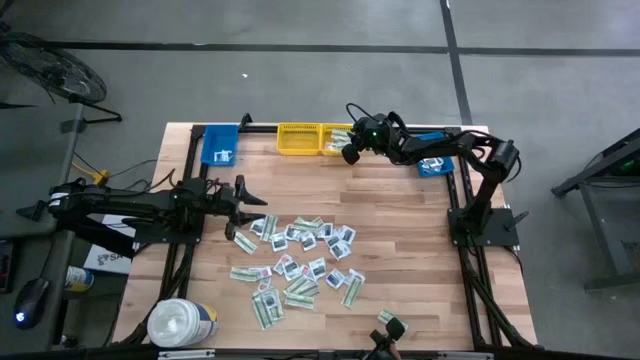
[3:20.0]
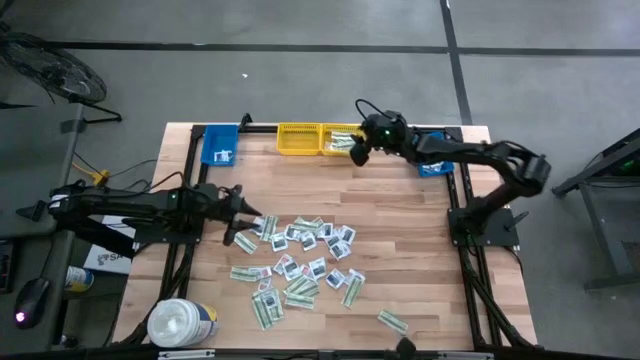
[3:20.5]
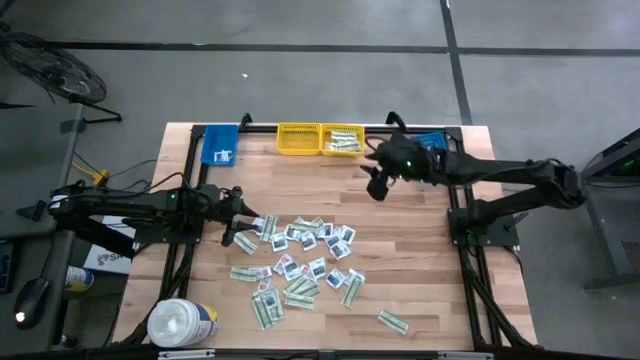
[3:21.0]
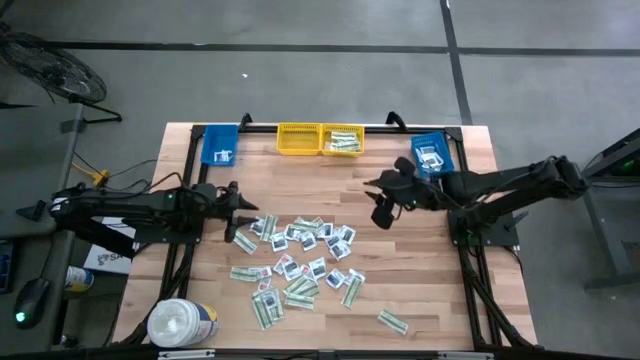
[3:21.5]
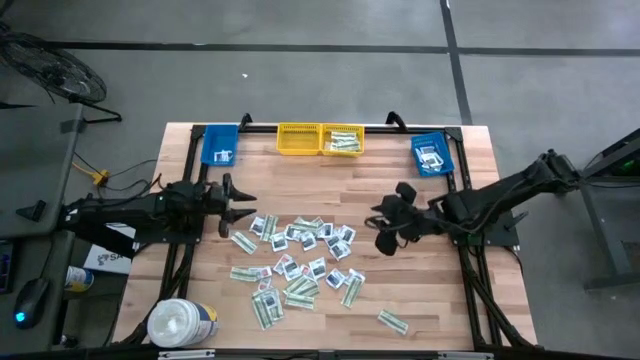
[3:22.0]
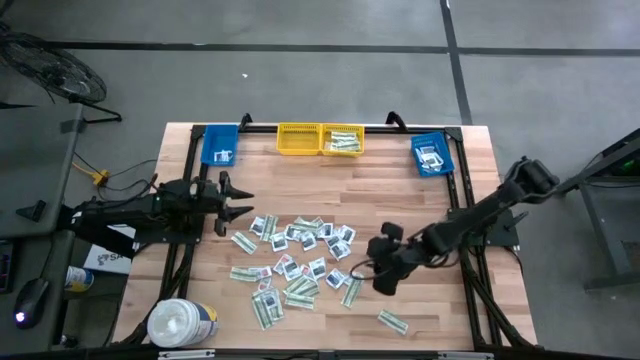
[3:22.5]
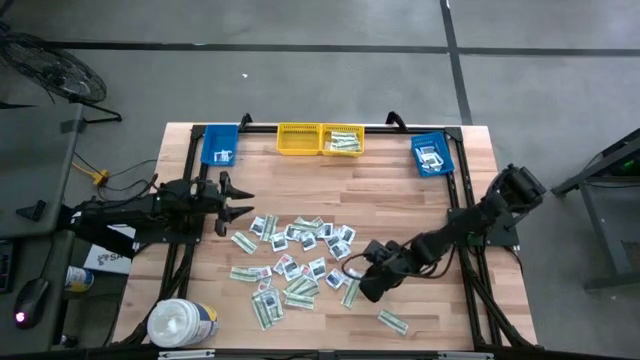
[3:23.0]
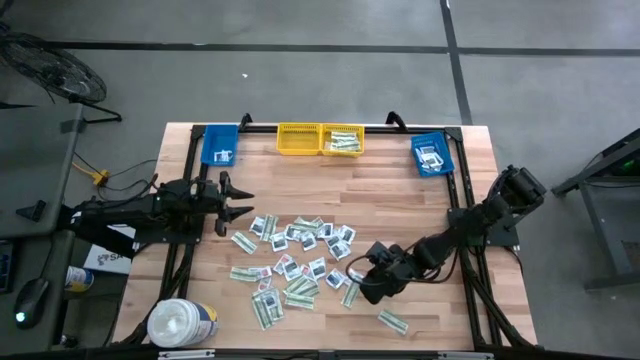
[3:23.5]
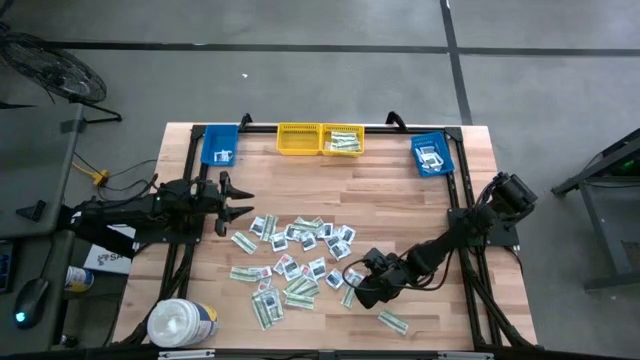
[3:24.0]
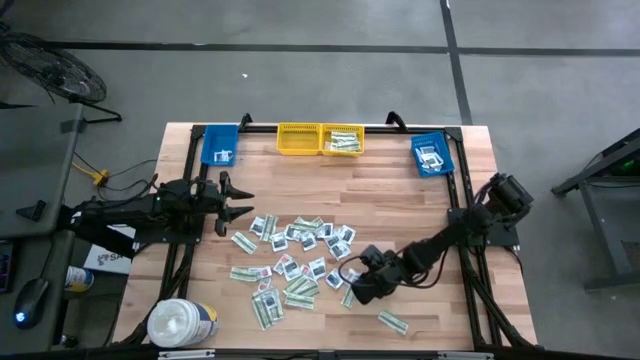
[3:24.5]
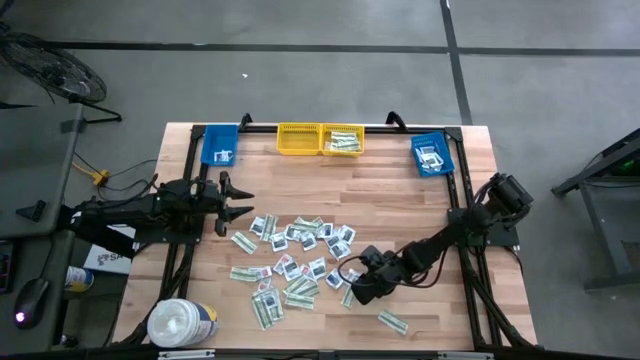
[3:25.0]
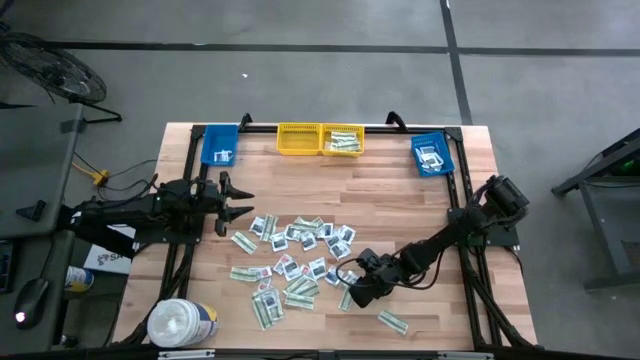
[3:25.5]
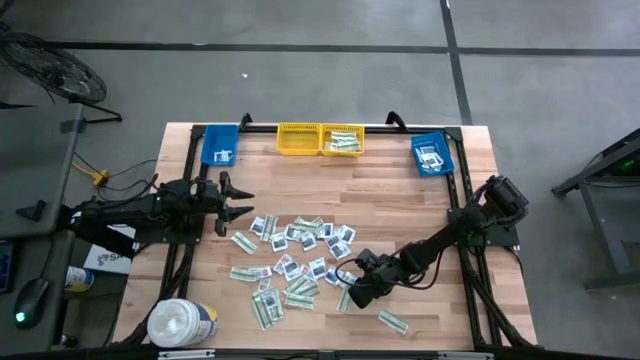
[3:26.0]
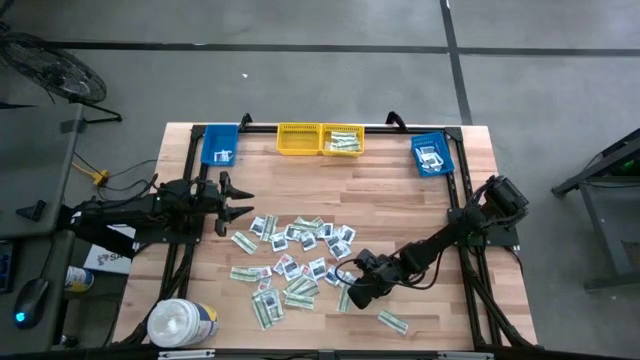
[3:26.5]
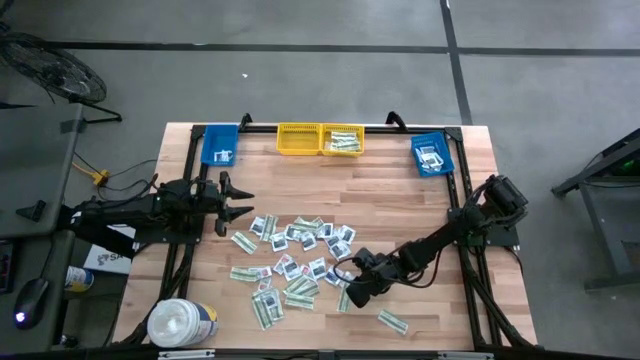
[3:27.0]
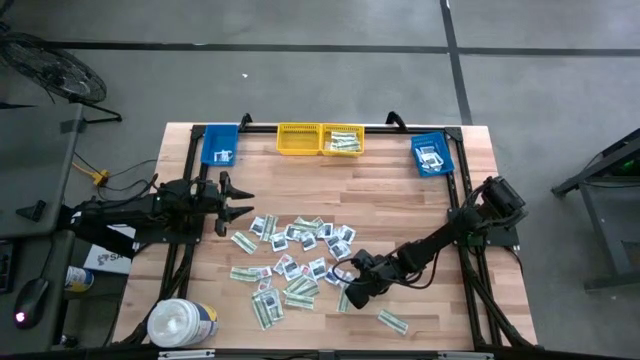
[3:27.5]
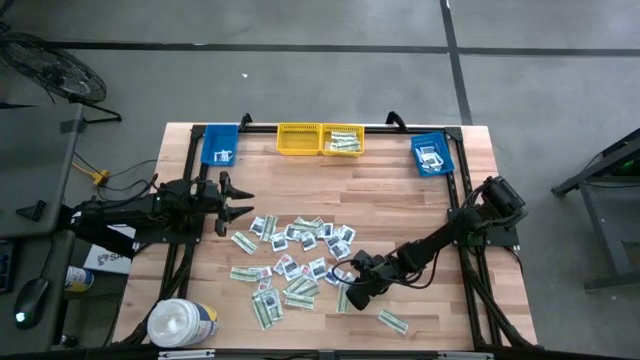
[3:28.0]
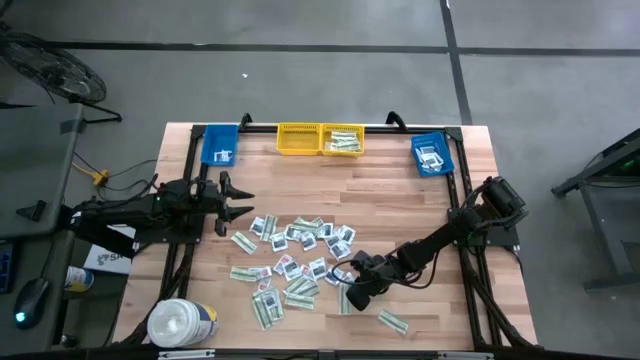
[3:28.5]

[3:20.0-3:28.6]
Task: Pick & Place First Aid Supplies
Put the green bandage pack into the right yellow bin

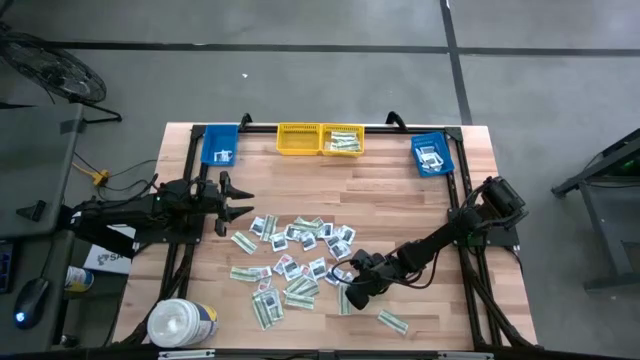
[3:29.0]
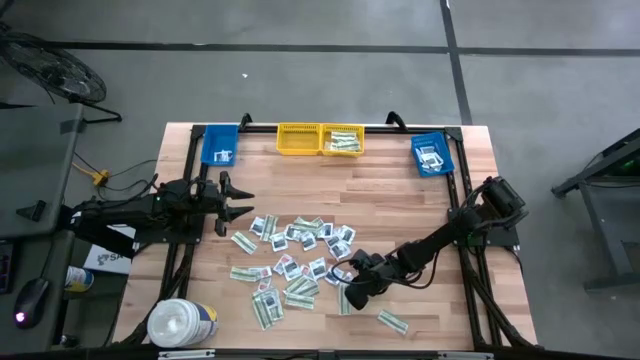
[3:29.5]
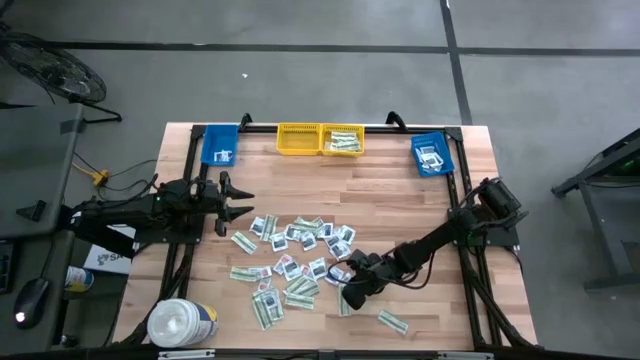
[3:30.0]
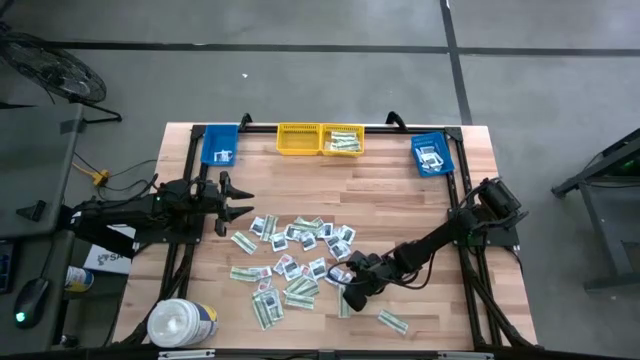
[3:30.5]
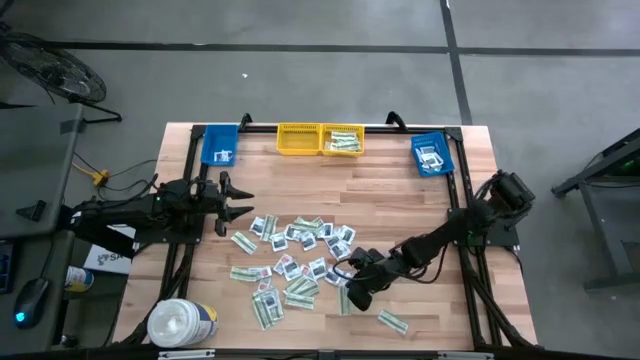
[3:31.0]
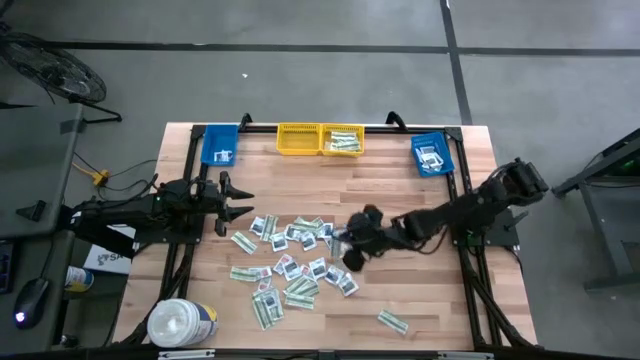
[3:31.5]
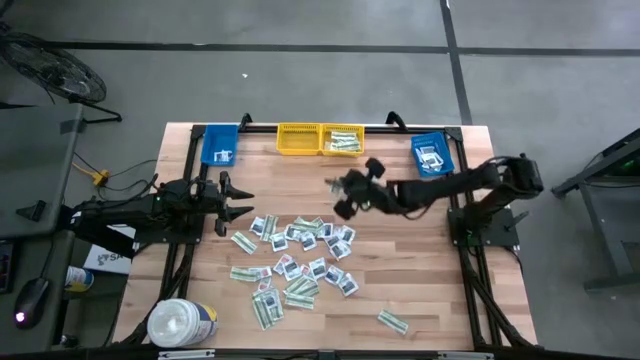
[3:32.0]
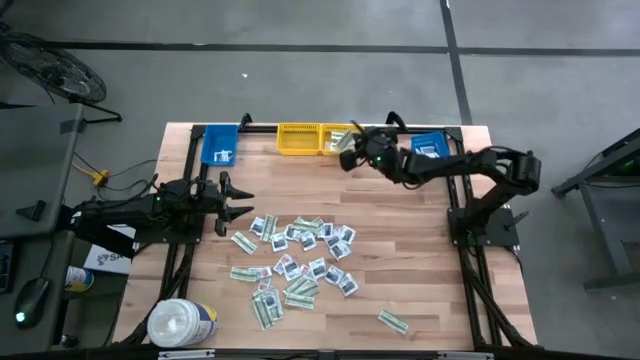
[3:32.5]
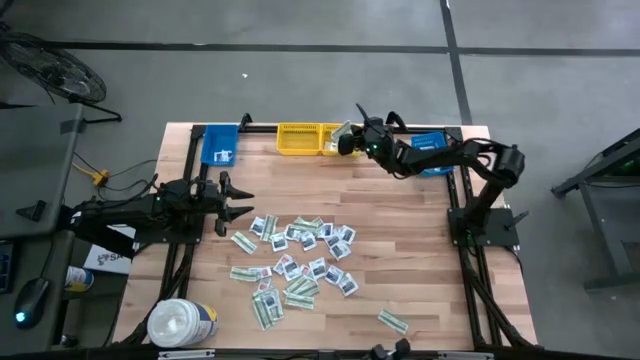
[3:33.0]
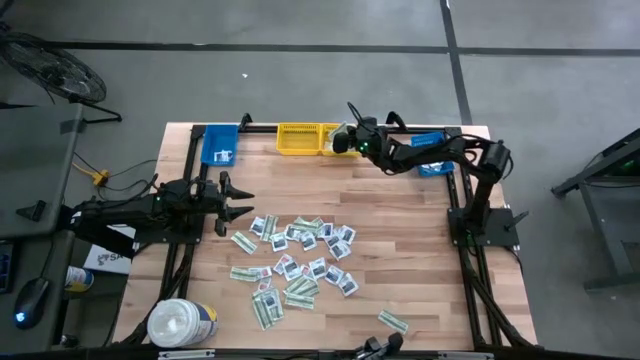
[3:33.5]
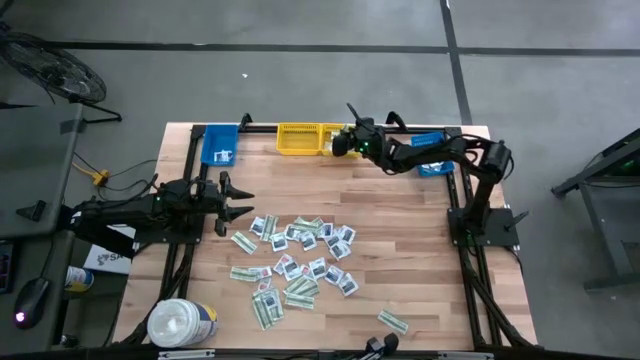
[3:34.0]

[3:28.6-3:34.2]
Put the green bandage pack into the right yellow bin

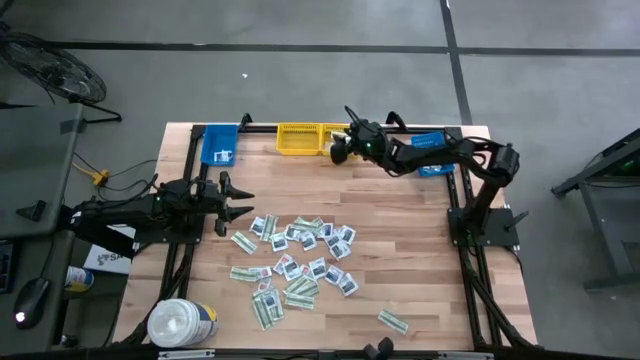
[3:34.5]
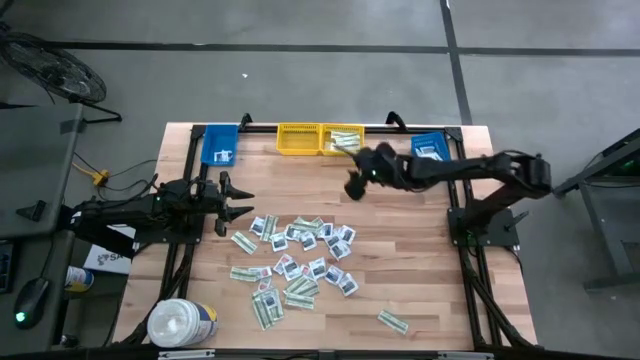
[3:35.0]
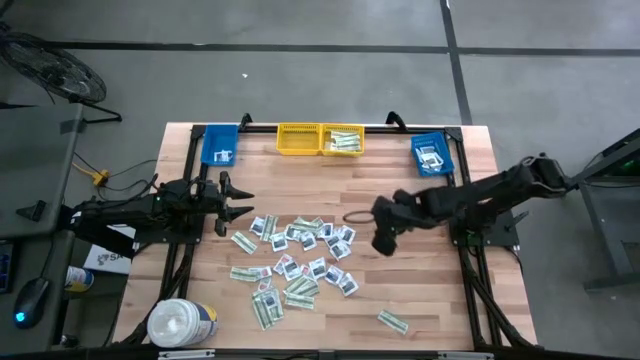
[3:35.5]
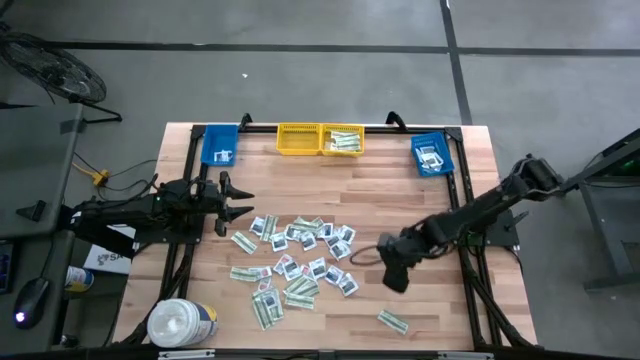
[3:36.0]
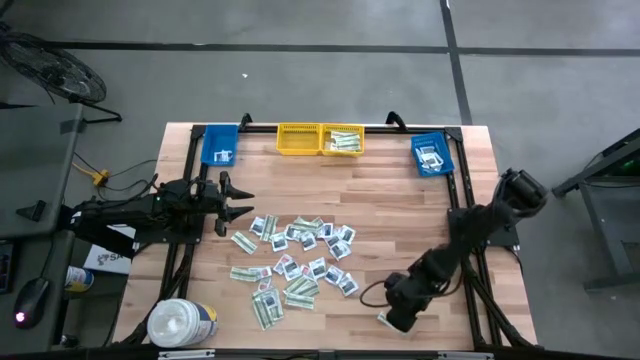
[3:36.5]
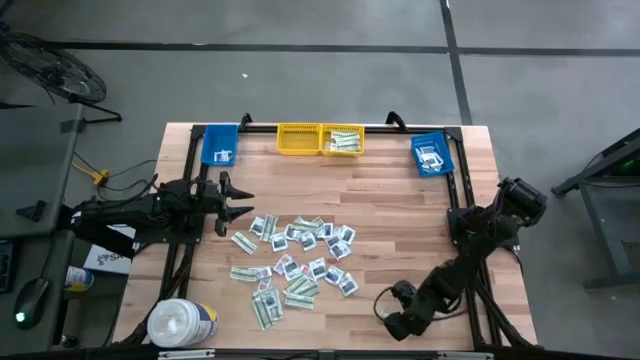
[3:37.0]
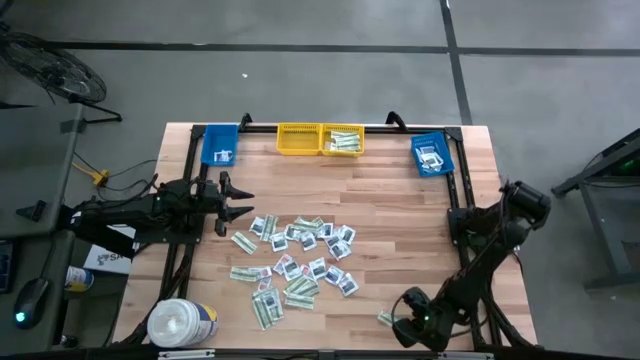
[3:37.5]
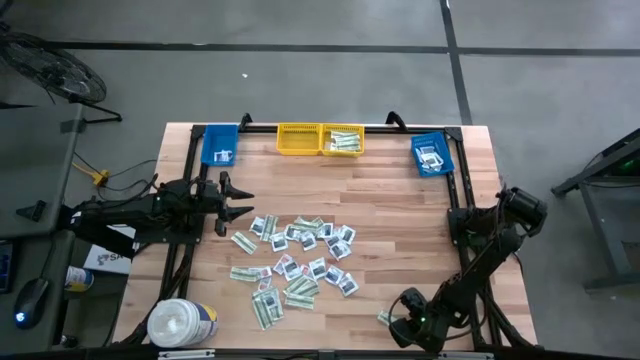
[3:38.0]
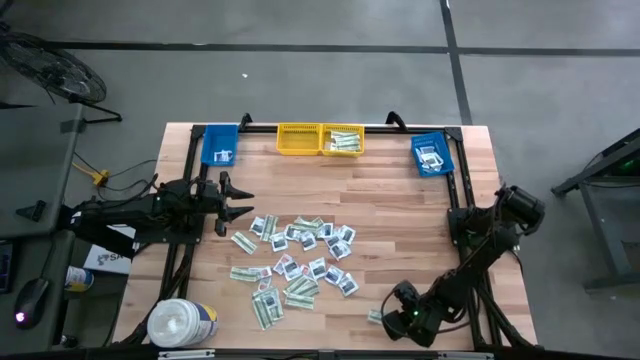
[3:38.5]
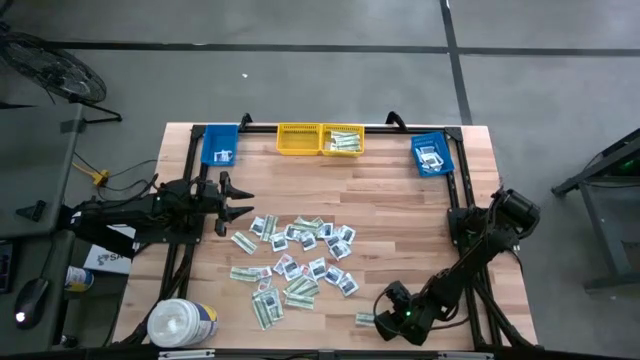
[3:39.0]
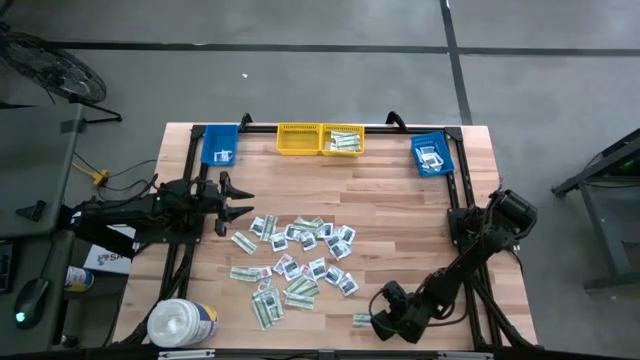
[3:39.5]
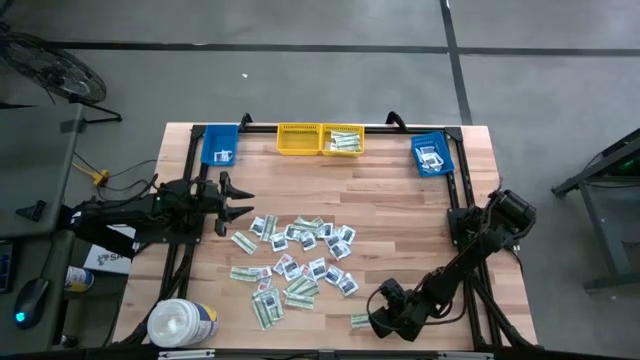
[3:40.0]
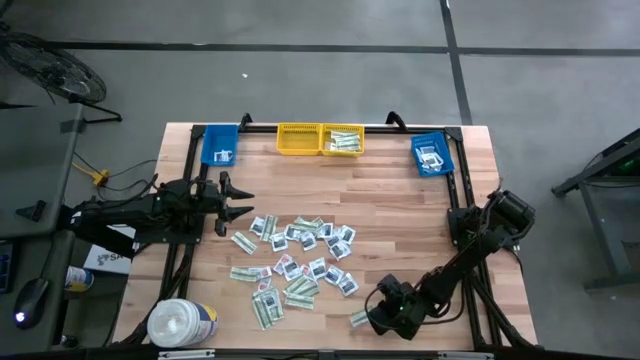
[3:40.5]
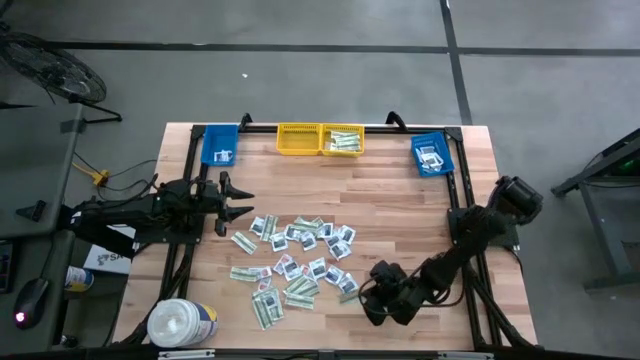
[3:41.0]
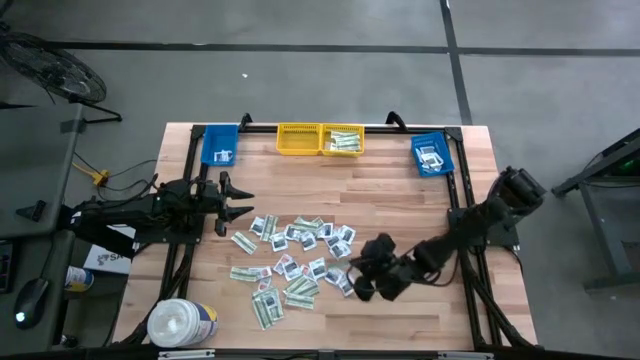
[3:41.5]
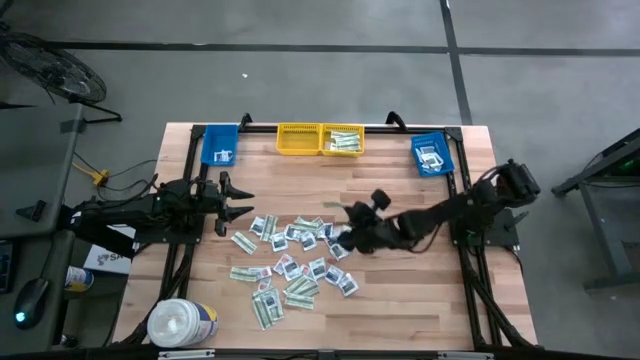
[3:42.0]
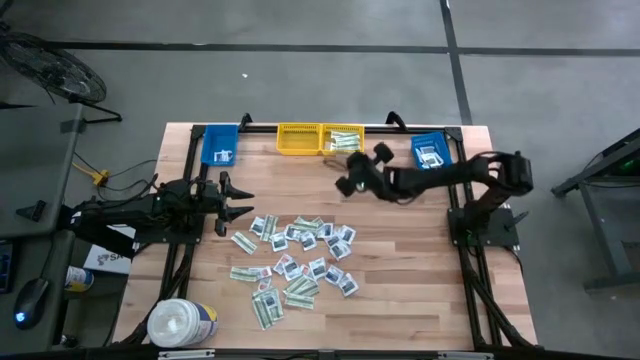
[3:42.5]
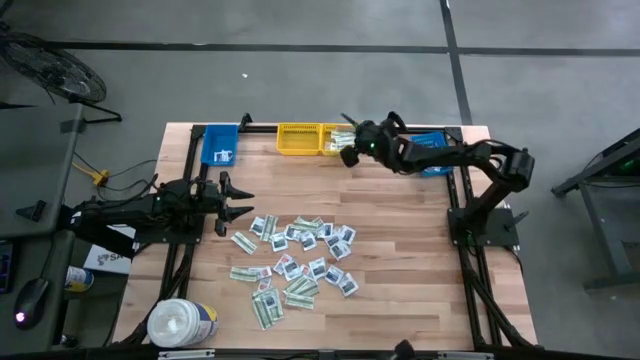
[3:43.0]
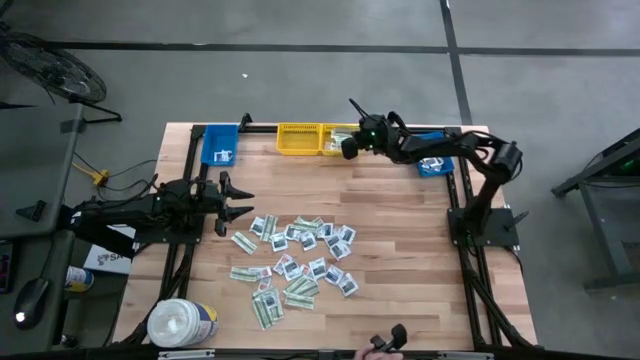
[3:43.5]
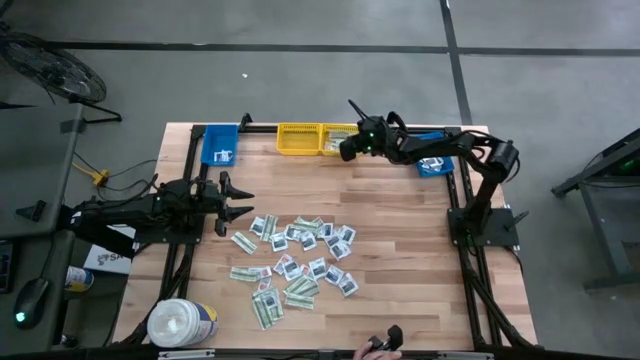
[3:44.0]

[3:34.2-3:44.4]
Put the green bandage pack into the right yellow bin
